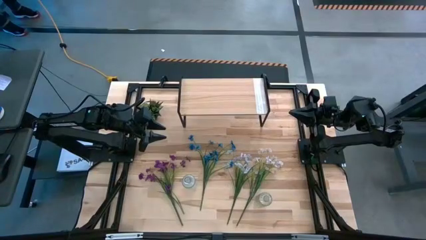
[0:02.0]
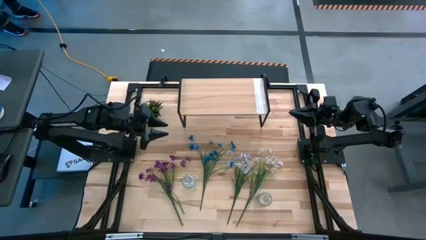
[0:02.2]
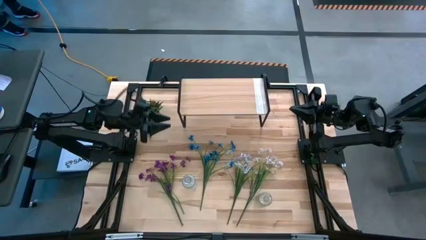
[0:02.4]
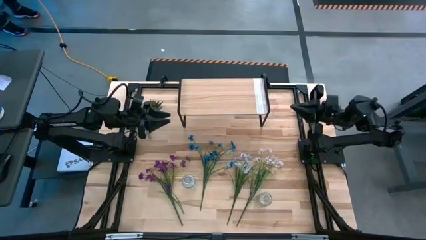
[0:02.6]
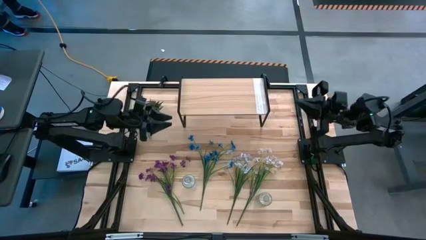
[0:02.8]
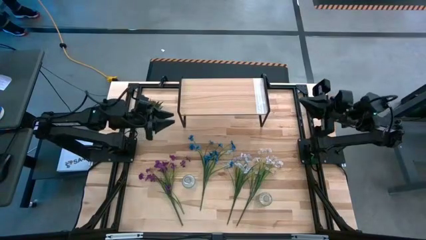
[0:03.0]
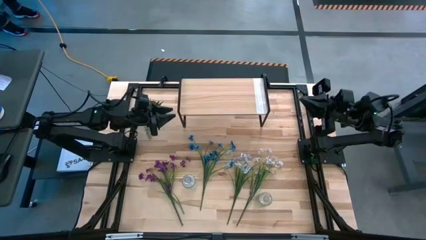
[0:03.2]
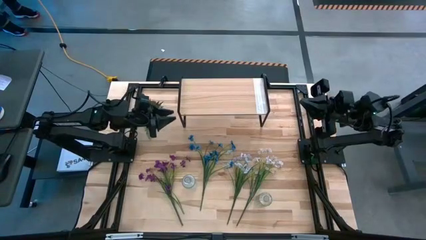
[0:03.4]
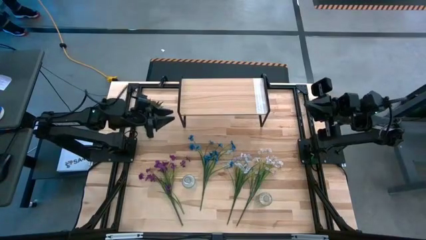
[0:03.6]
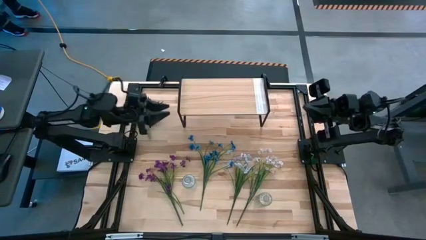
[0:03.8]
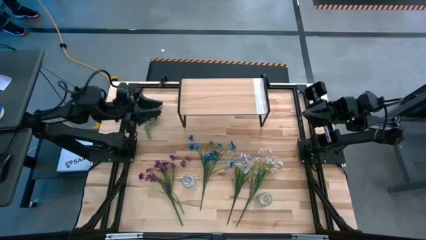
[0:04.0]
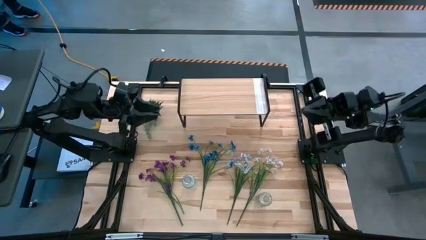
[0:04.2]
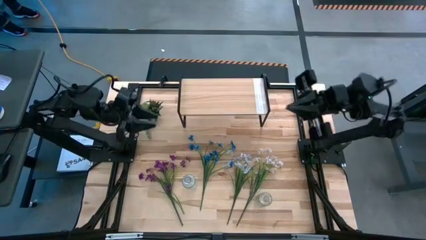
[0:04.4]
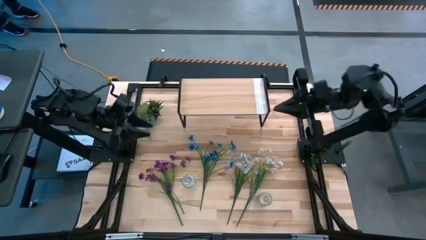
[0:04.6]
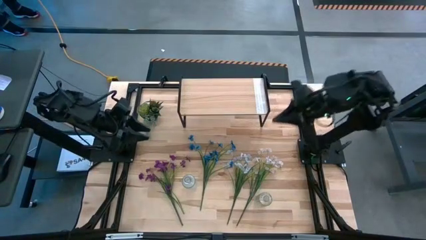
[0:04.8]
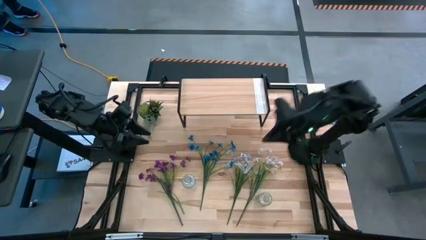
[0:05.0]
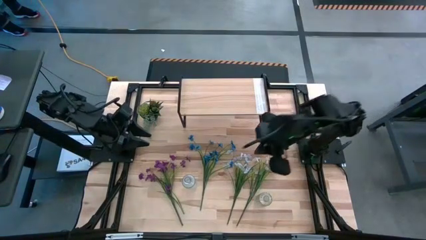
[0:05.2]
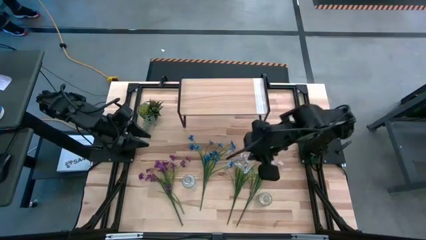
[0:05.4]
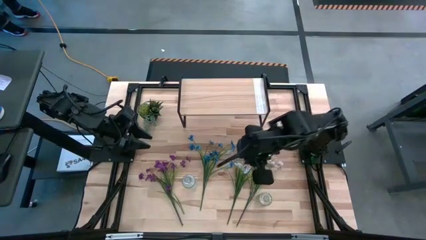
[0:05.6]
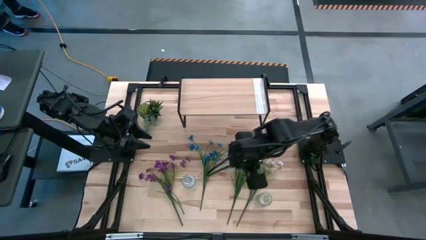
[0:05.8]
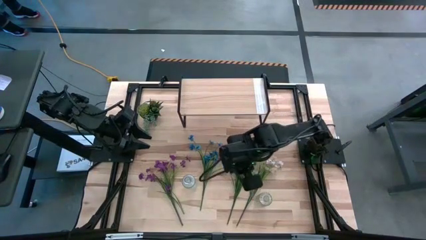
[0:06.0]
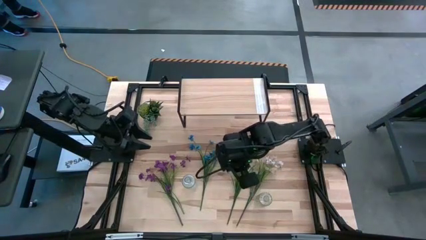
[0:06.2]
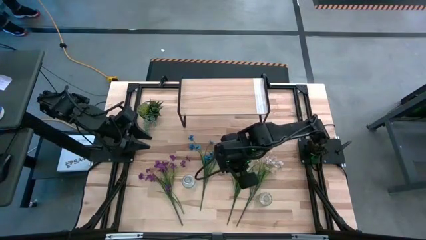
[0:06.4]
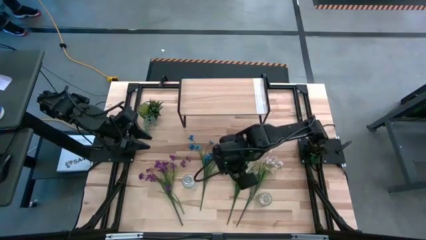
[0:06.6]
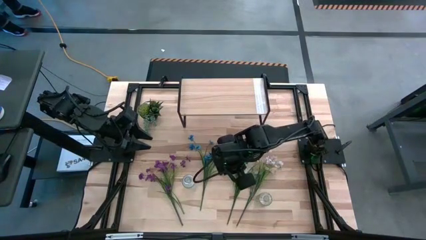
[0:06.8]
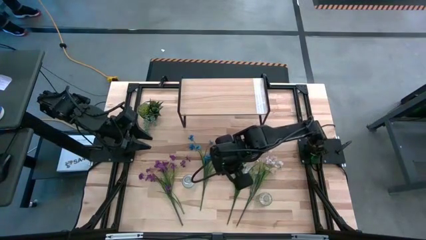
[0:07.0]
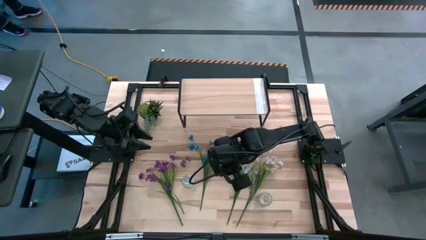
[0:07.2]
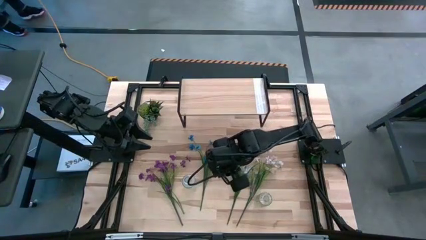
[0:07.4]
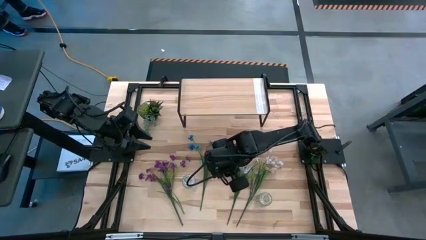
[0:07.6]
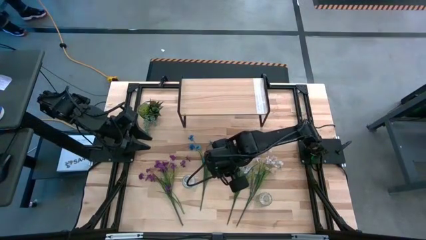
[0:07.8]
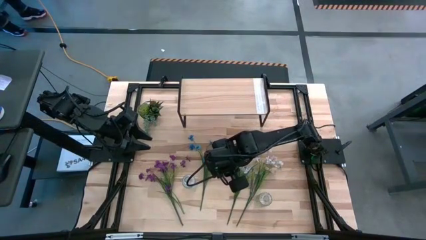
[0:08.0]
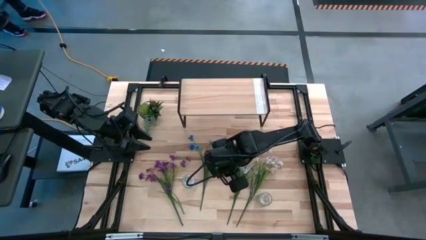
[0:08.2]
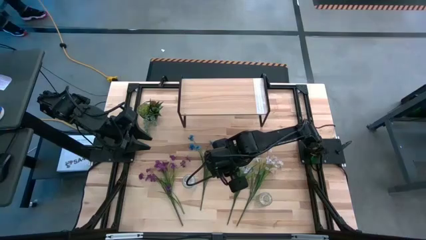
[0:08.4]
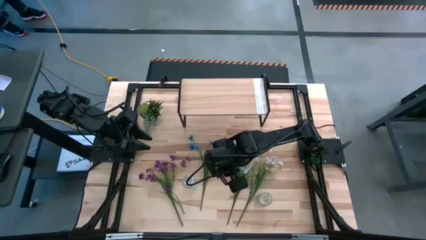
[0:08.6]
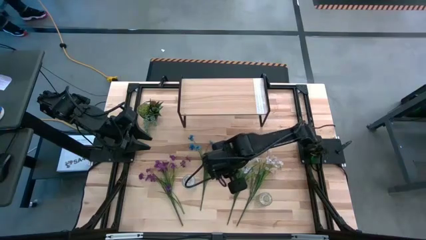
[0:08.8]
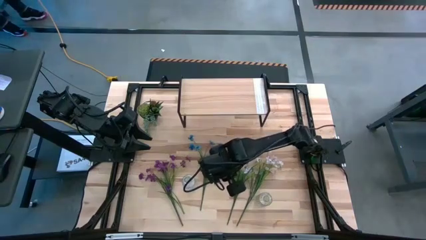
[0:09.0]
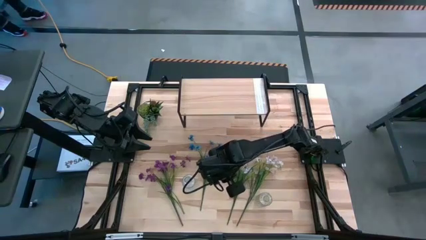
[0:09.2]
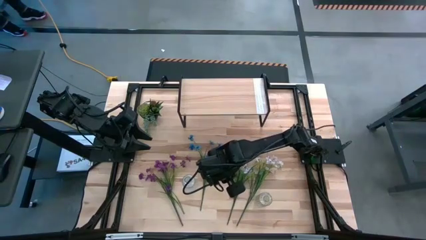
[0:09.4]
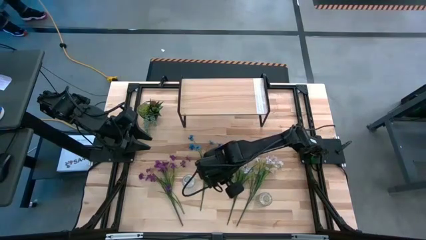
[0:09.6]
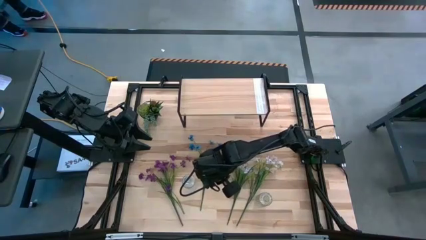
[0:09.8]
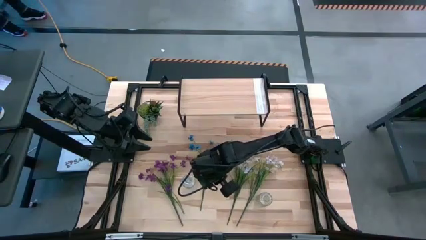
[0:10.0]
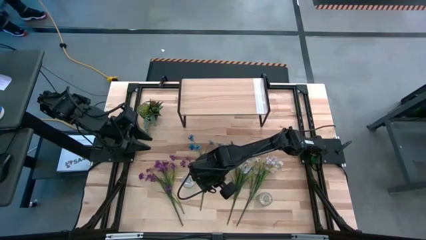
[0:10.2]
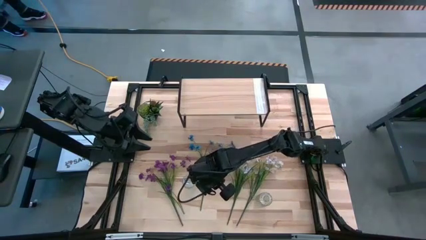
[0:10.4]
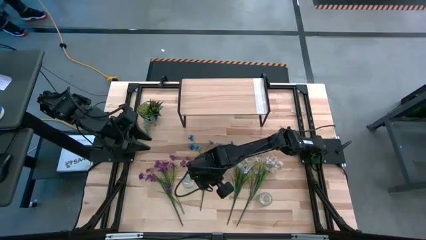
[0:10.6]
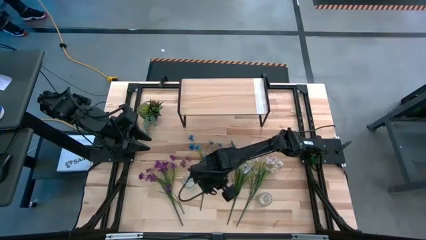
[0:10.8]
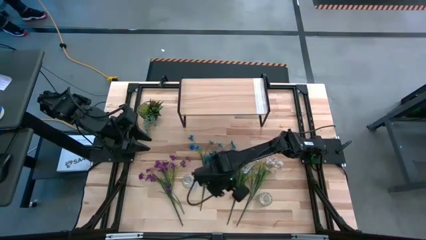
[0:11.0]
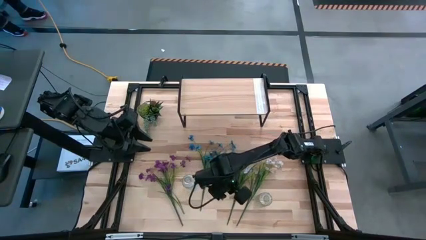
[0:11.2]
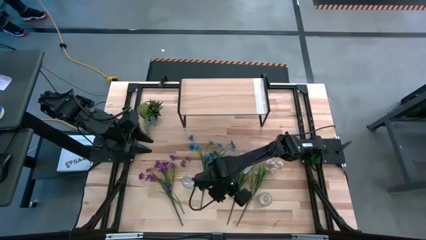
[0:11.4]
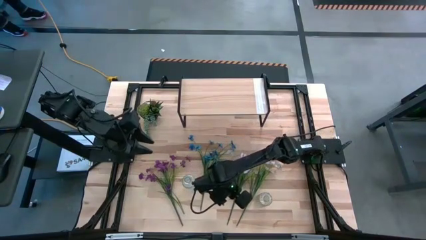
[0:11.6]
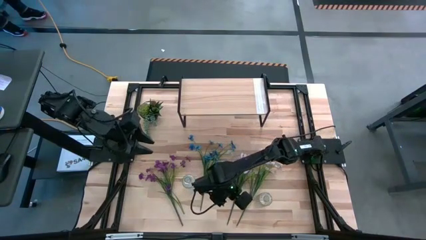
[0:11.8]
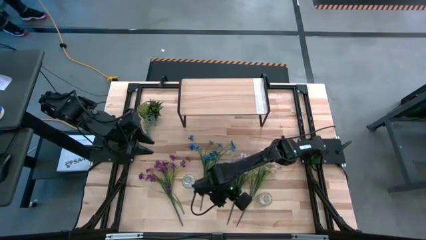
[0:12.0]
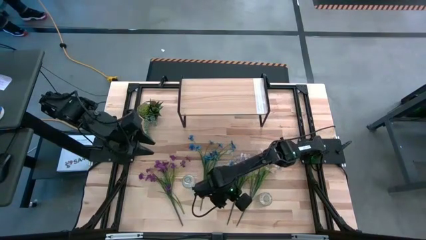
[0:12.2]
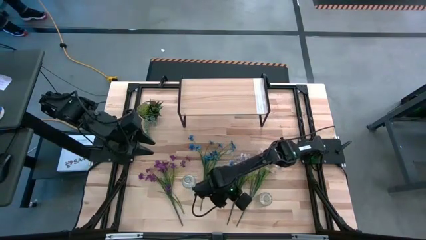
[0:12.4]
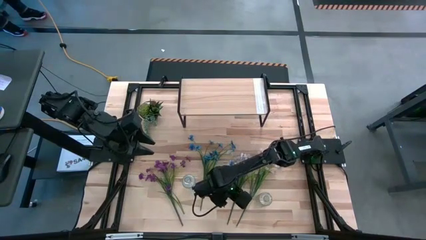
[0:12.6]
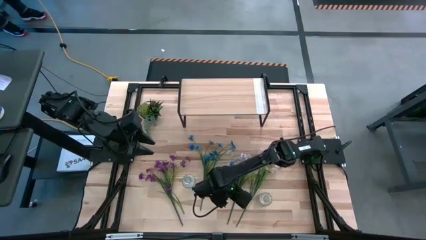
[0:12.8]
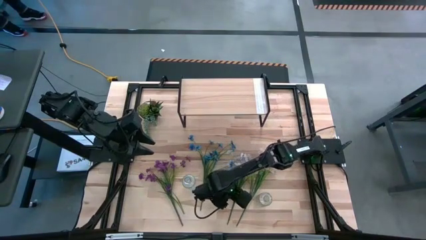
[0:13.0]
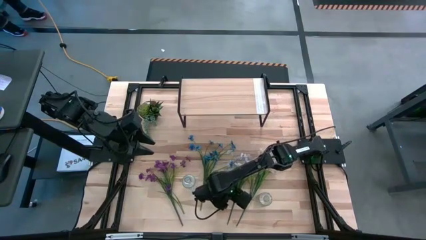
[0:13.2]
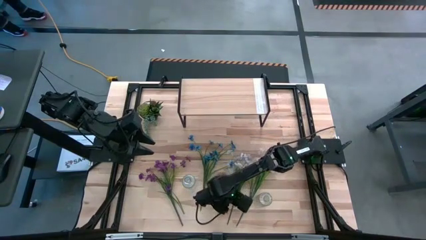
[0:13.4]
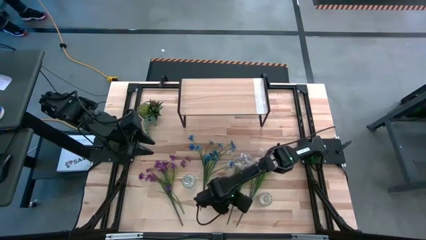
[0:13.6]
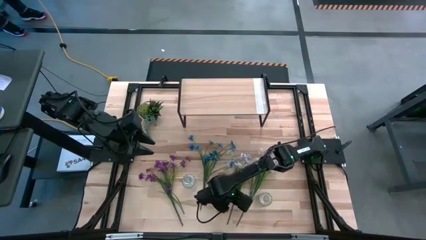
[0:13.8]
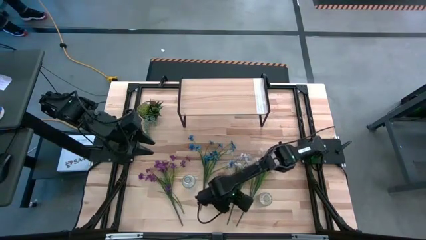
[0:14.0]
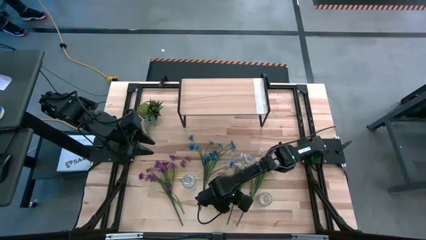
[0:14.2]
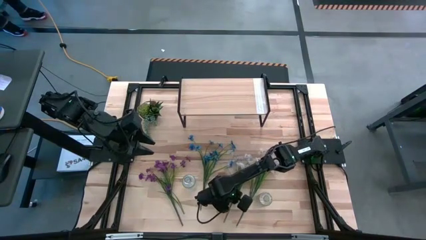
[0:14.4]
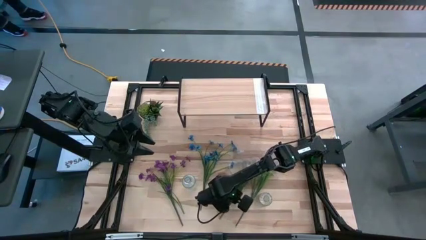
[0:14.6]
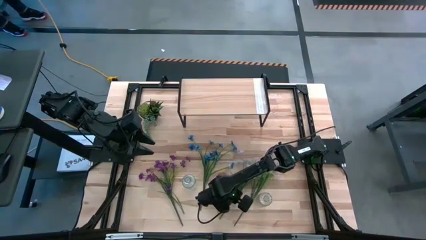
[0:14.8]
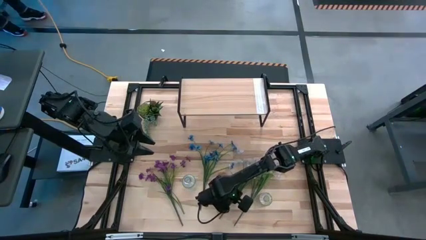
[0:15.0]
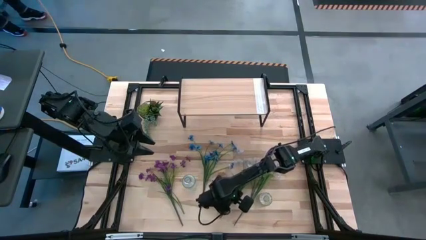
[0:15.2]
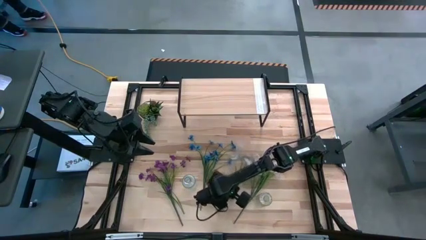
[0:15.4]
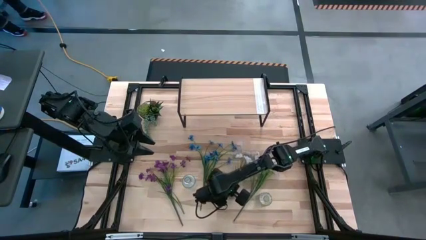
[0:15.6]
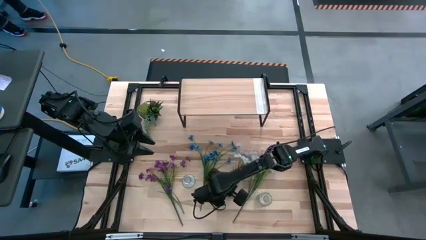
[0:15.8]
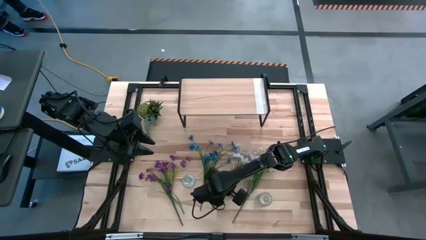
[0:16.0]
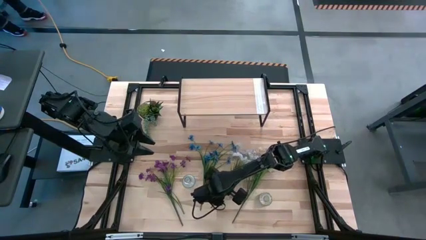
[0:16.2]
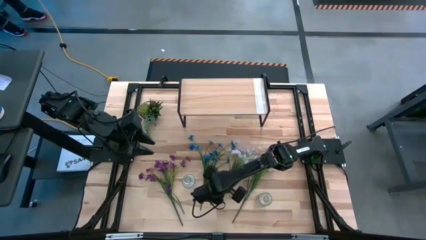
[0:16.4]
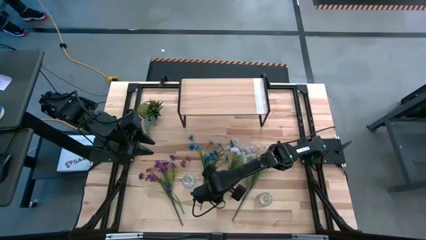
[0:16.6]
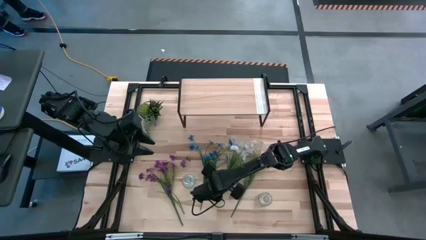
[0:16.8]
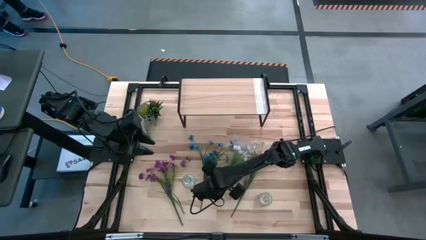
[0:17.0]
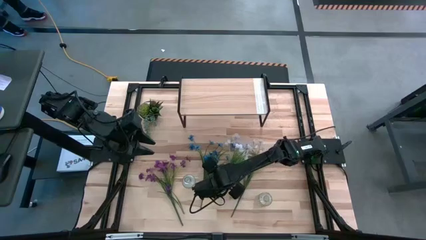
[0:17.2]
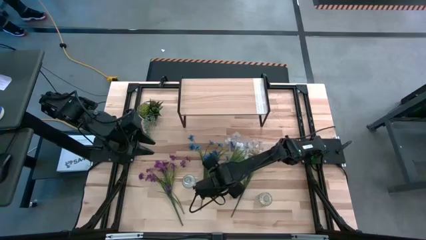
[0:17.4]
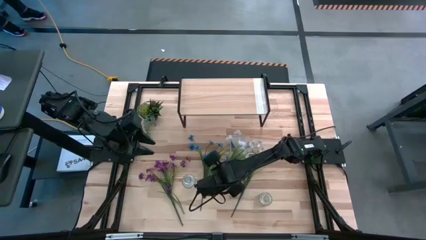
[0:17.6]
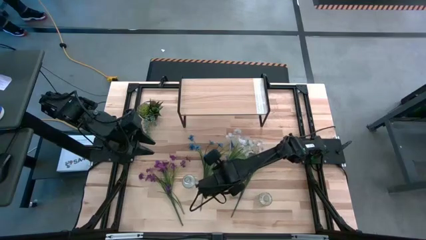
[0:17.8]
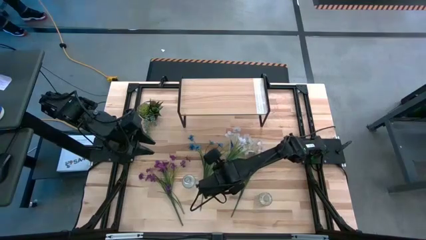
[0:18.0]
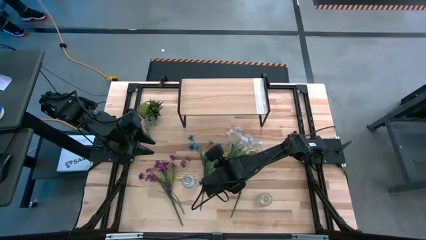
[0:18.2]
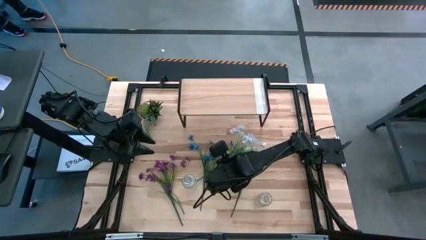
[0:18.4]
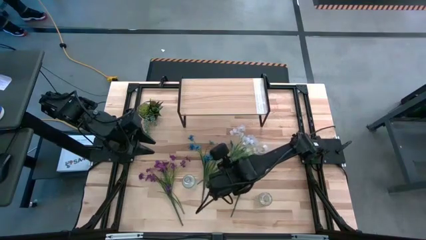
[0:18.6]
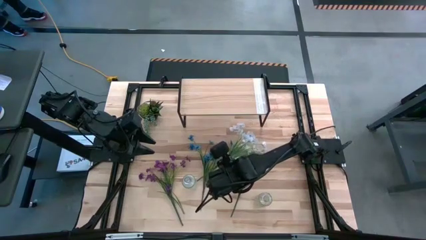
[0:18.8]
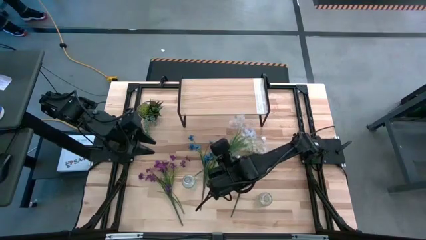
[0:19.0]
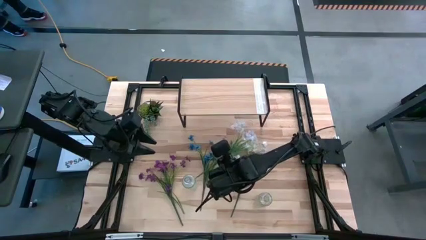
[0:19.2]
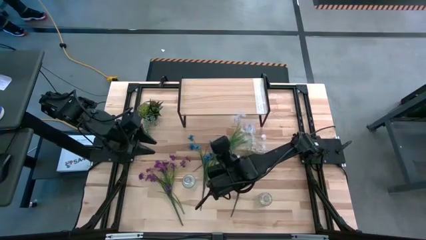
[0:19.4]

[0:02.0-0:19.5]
Task: Pick and place flowers into a vace then onto a shelf
Put the left white flowers into the right transparent vase
